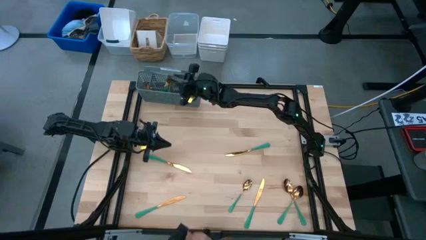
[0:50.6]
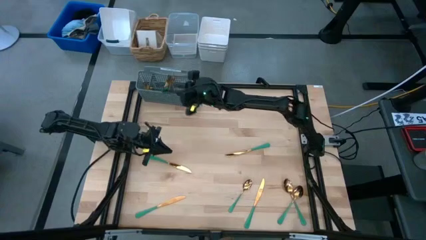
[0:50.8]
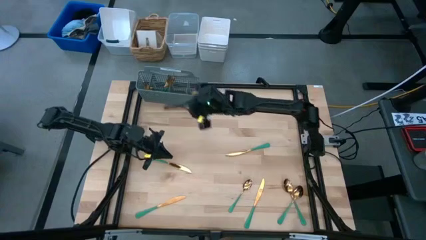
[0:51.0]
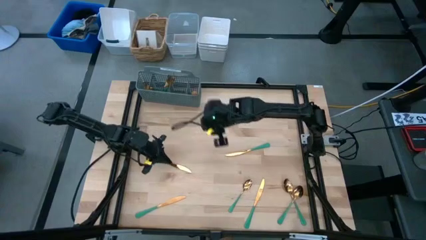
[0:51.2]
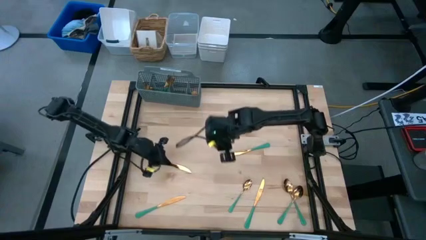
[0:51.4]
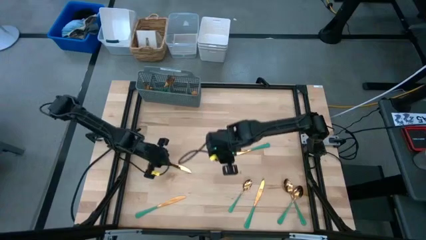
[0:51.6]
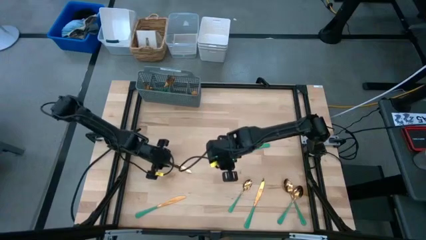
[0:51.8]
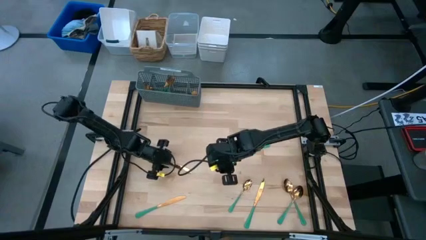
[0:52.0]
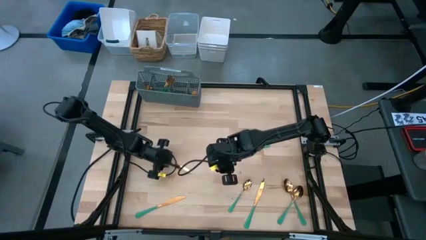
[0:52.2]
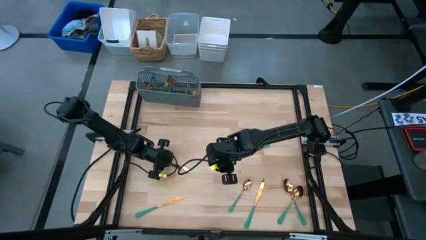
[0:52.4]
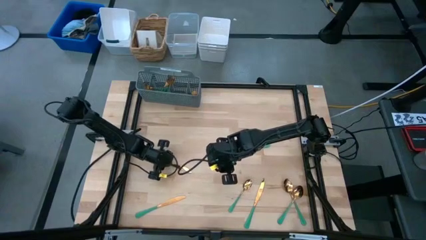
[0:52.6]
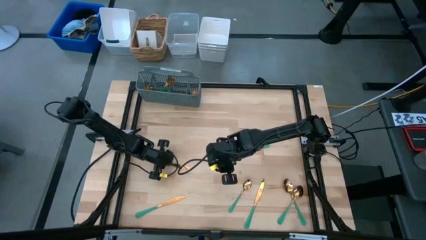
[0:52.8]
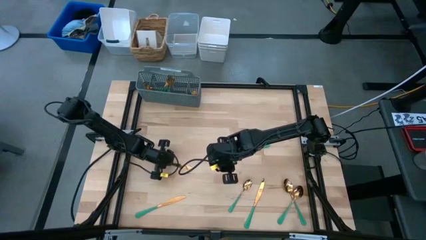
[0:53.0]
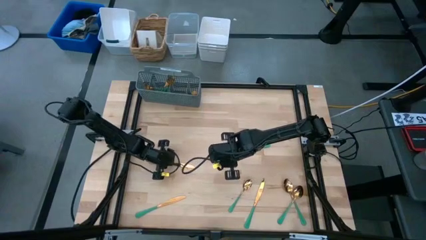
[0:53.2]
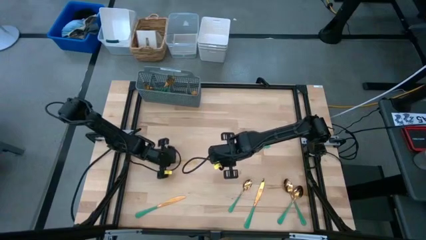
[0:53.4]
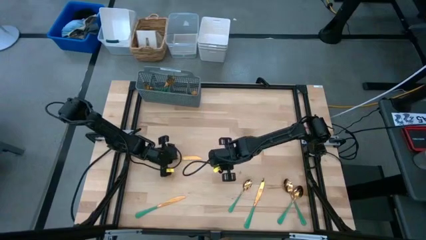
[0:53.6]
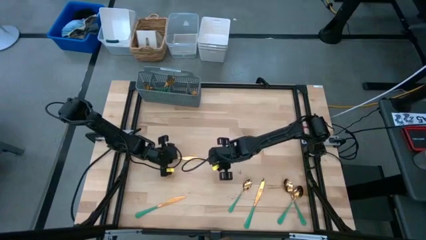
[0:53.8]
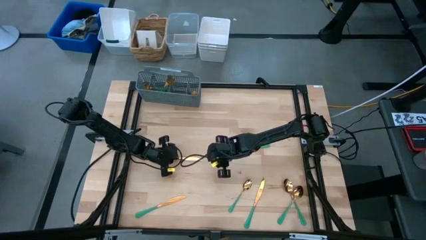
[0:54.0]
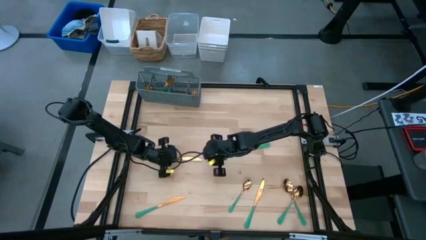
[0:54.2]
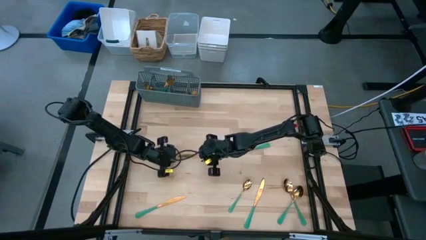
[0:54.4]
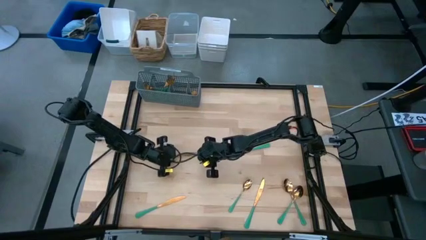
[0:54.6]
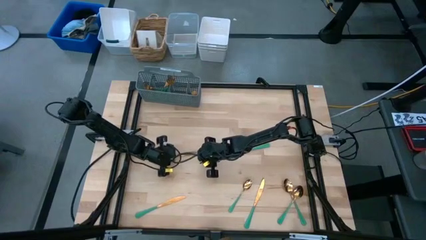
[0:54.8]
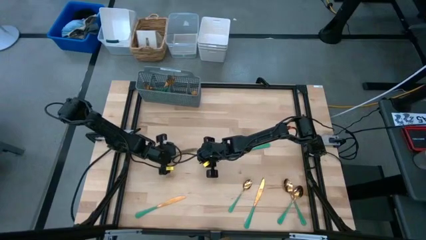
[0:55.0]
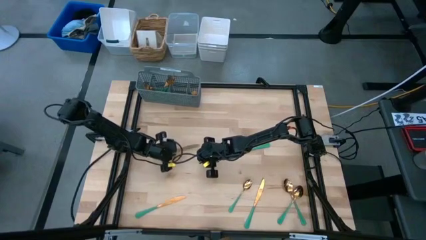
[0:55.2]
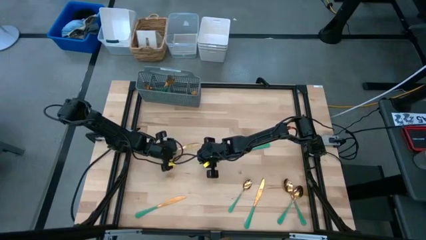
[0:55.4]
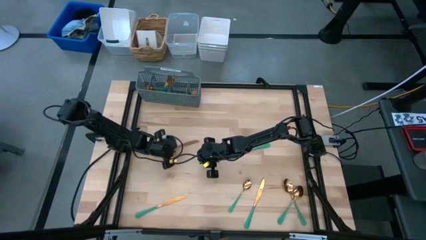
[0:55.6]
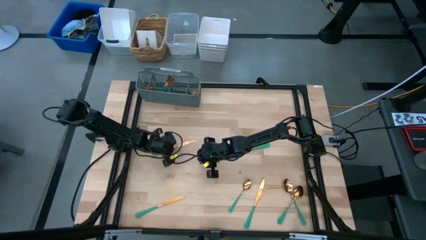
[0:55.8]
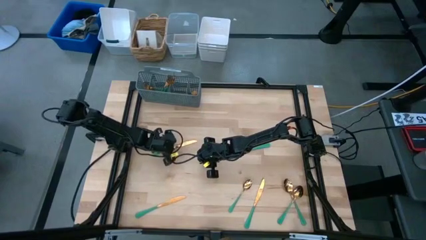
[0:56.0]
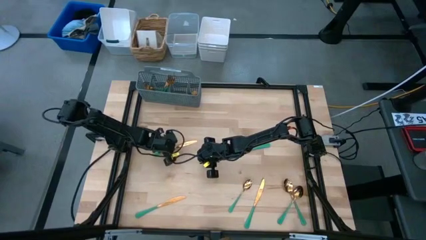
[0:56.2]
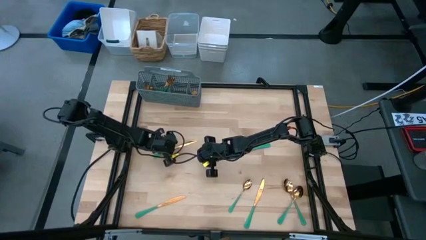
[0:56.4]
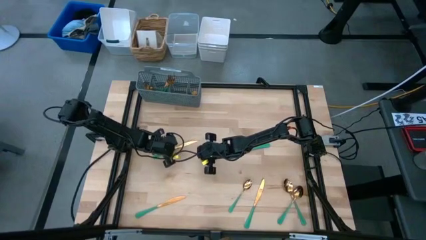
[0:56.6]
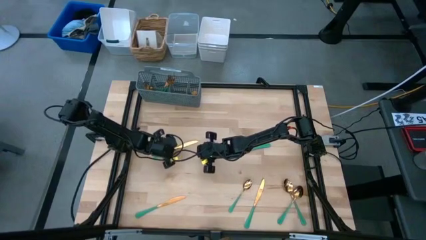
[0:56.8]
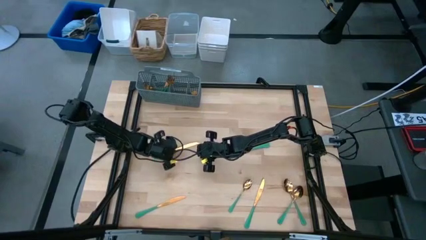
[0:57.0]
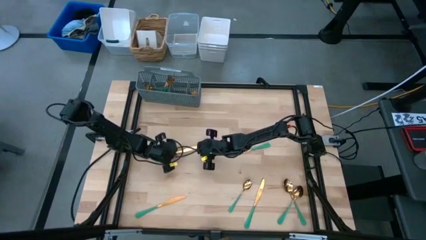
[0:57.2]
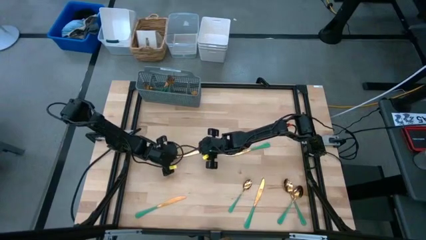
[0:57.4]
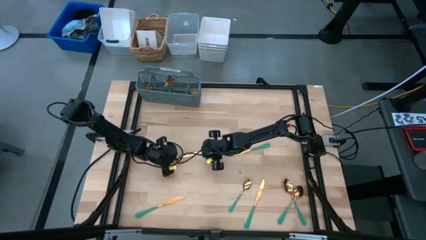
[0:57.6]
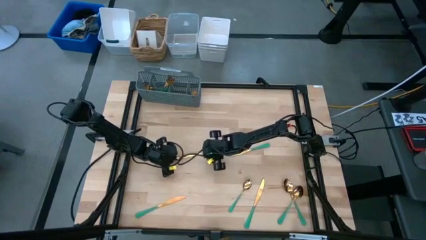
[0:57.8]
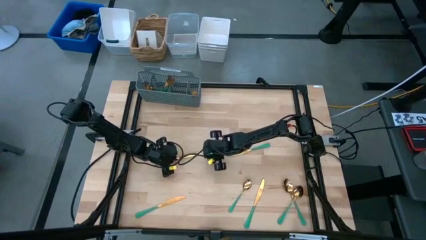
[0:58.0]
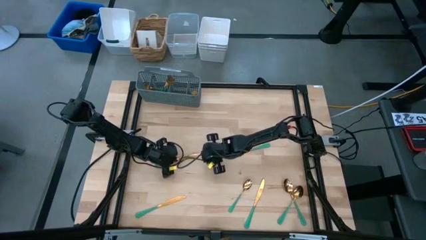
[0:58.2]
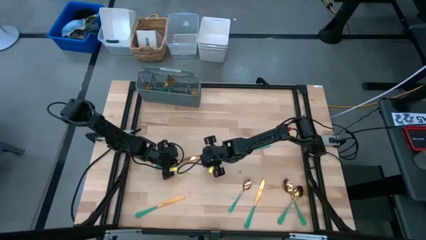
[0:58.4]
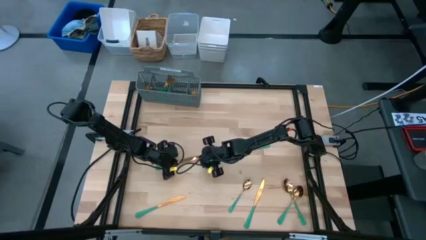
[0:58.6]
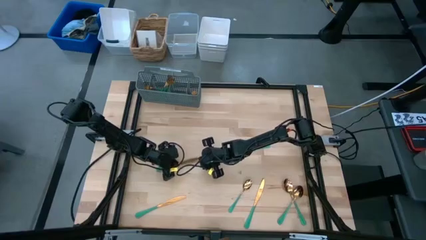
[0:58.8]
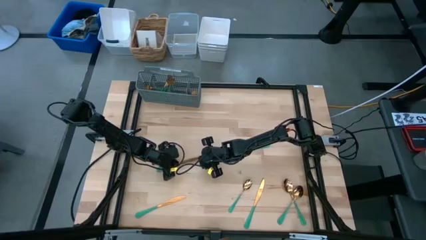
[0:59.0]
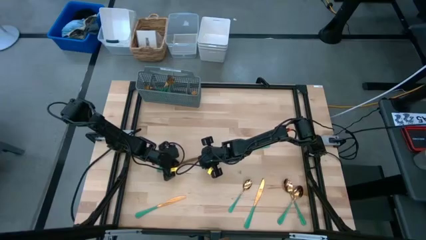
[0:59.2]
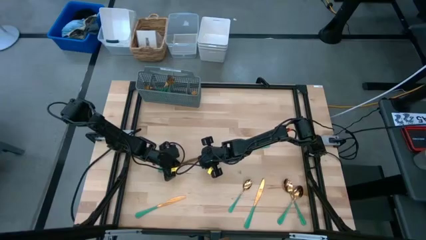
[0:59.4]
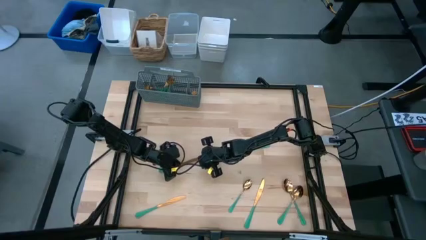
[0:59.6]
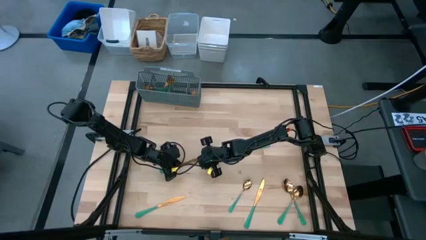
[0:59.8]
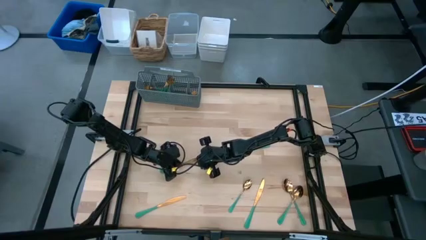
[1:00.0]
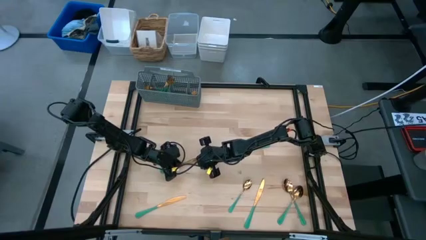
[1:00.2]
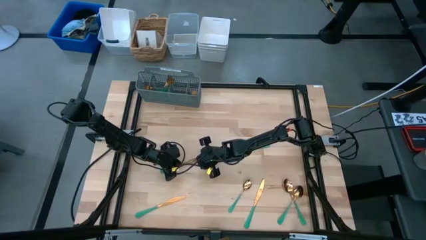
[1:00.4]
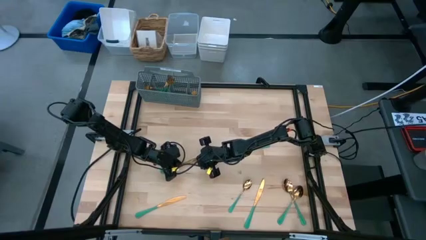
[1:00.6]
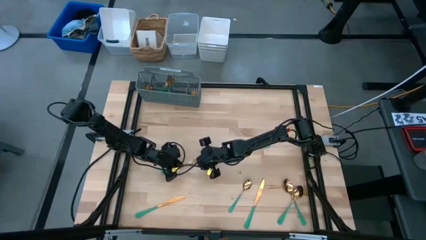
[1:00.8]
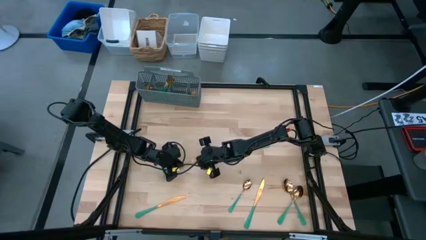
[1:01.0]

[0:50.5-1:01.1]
Task: Sort silverware
Put the green knife into the gray silverware basket

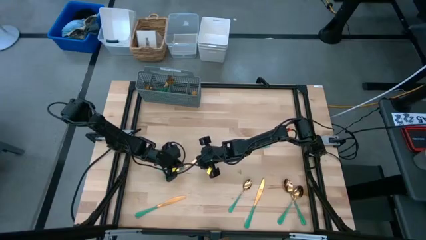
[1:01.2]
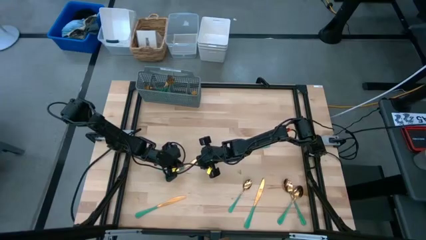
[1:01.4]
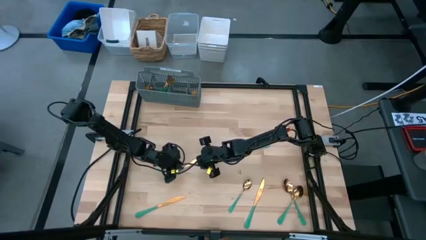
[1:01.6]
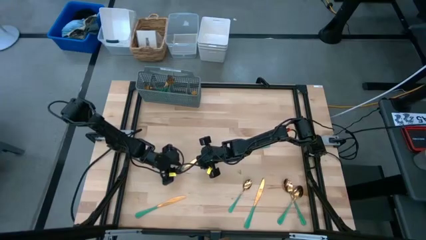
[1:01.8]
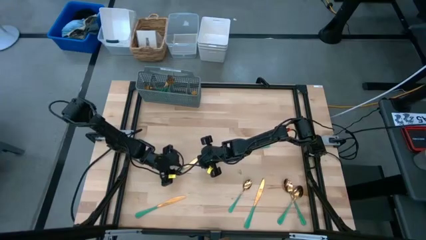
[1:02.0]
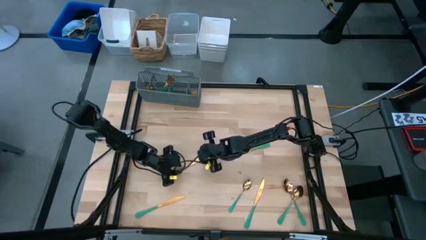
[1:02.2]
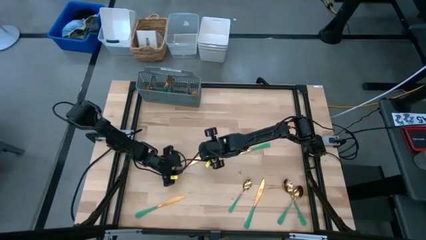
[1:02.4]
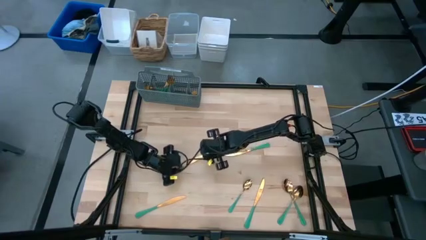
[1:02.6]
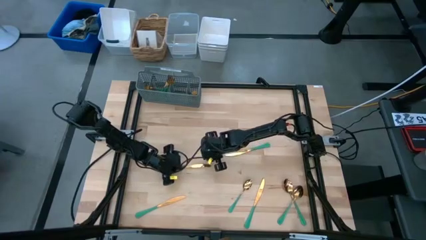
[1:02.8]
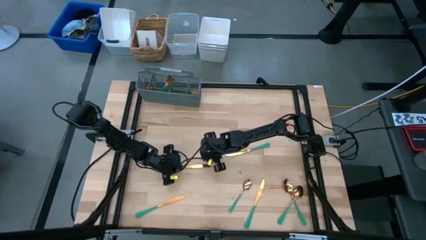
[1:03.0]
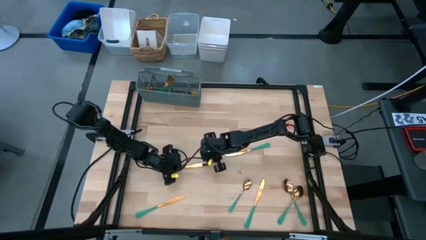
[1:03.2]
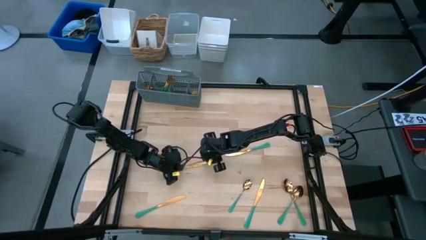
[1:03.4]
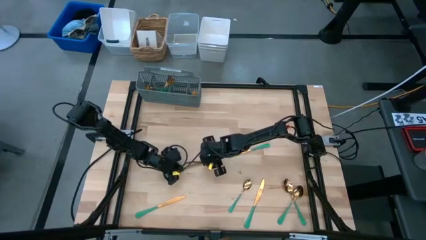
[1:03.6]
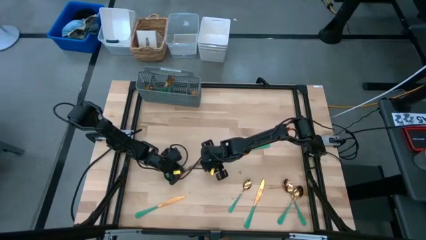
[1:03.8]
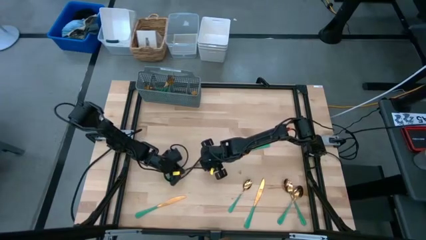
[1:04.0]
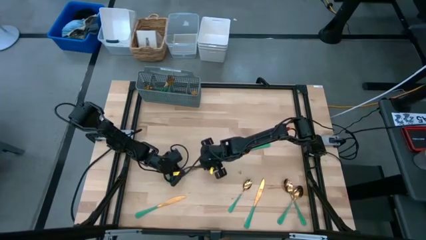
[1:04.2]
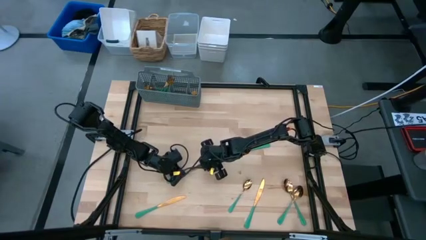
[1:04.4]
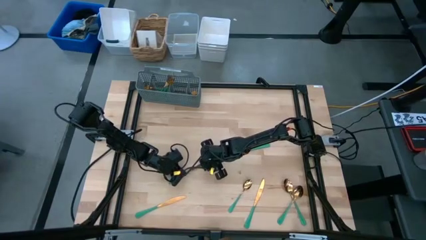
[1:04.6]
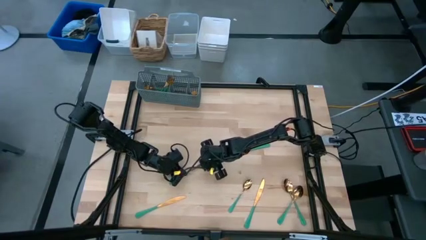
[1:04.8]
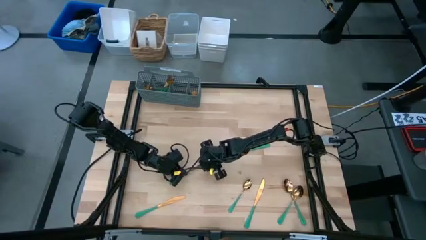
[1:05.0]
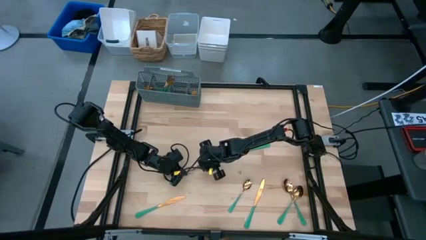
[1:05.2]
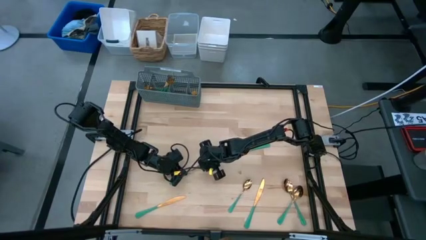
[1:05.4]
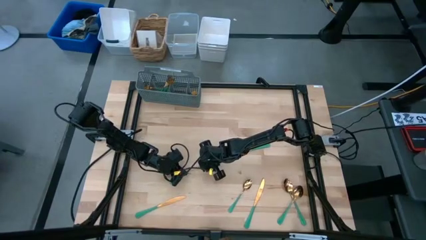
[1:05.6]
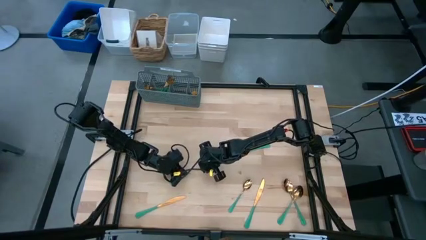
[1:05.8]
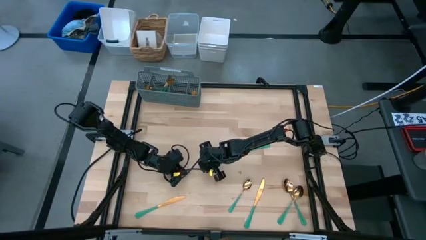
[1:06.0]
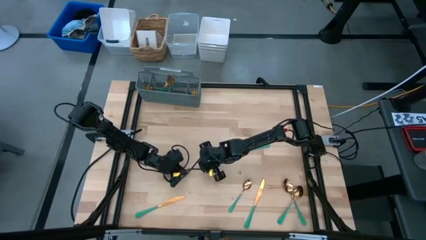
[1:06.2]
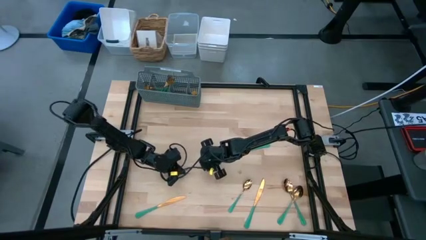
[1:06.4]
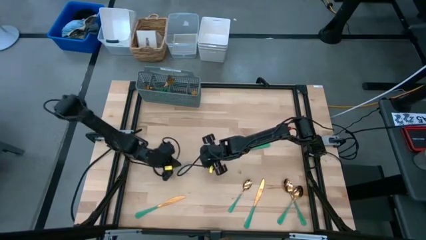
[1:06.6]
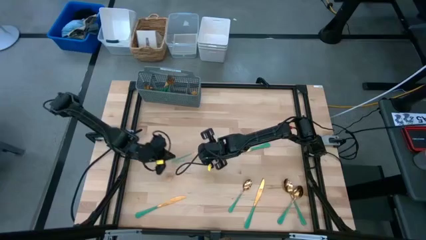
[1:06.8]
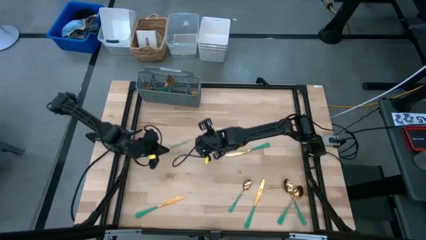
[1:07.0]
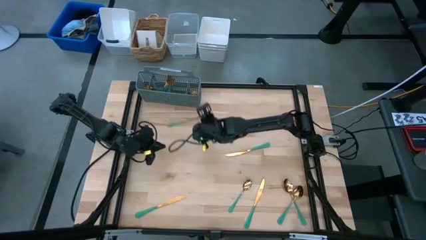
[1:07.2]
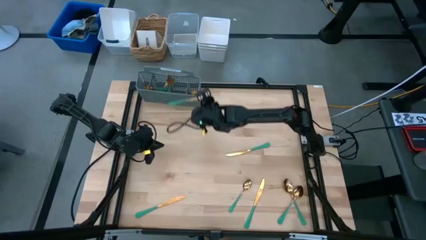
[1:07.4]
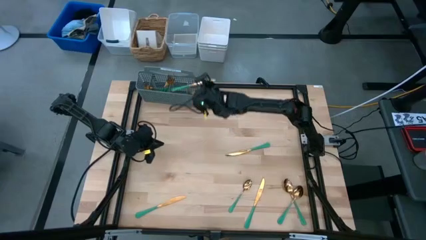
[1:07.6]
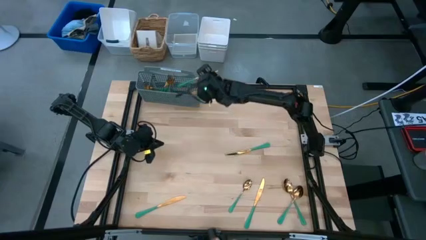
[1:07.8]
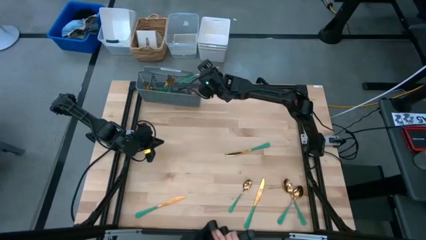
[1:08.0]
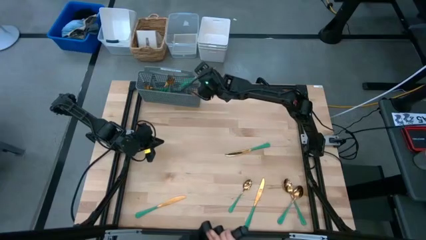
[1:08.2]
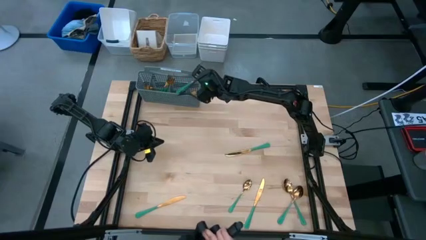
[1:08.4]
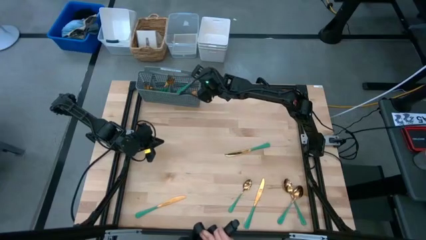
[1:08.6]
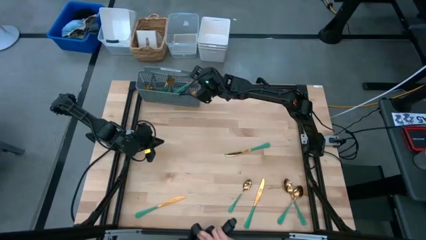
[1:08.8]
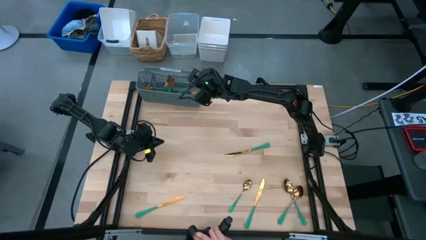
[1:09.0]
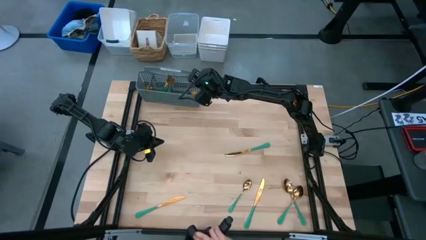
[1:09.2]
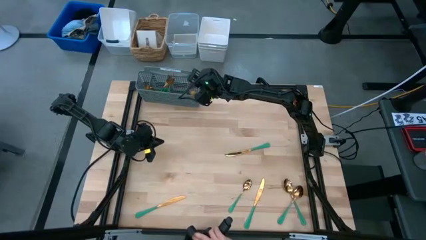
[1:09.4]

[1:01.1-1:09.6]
Put the knife into the gray silverware basket
